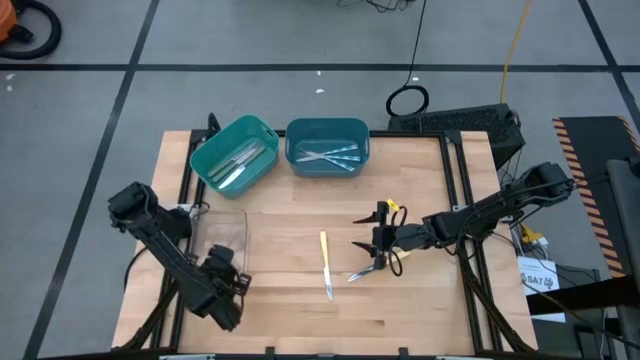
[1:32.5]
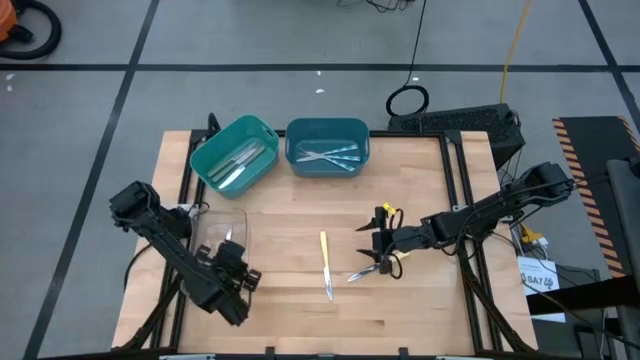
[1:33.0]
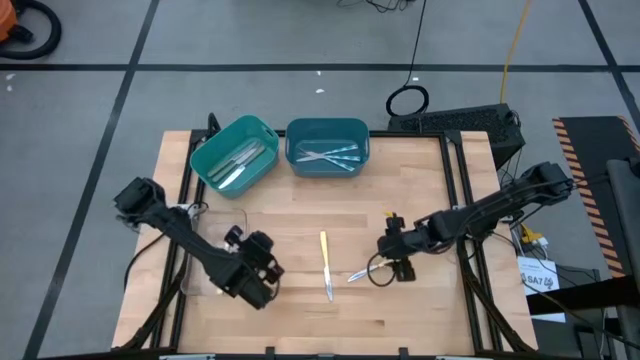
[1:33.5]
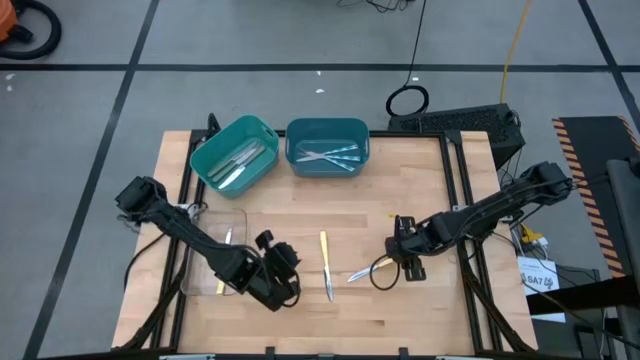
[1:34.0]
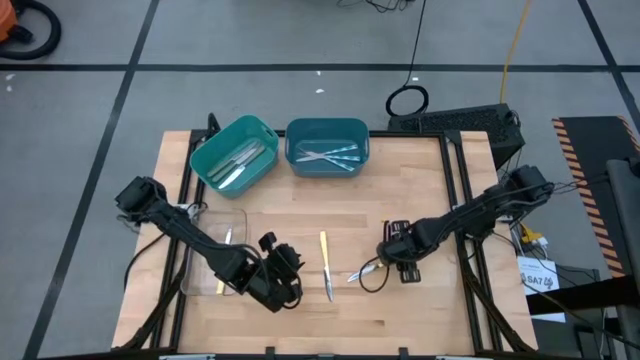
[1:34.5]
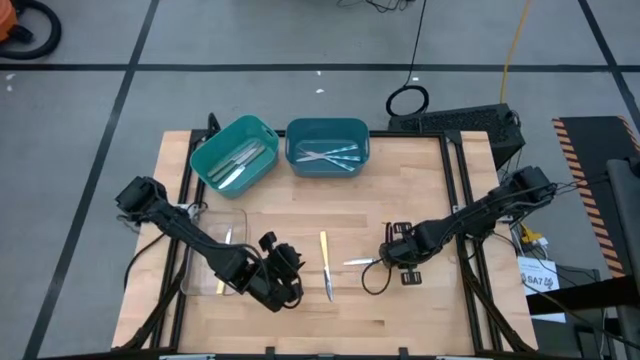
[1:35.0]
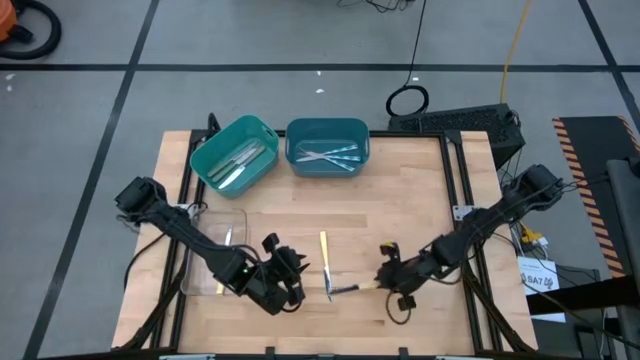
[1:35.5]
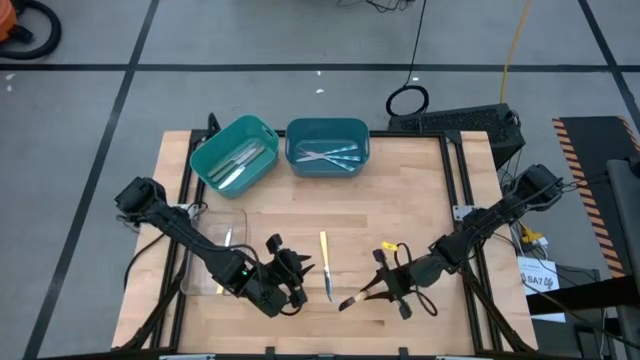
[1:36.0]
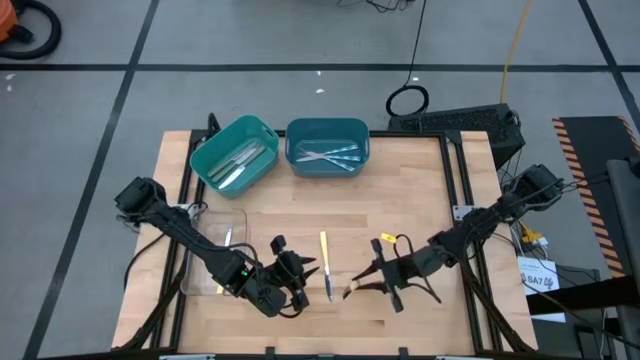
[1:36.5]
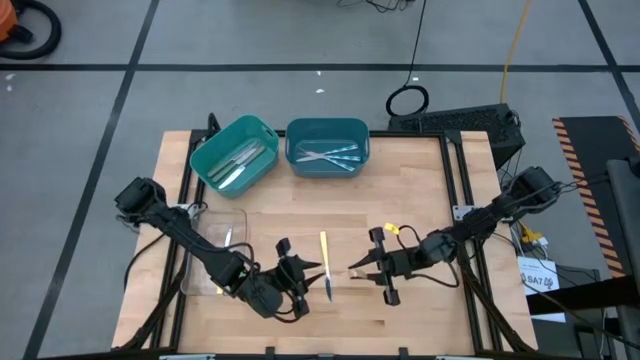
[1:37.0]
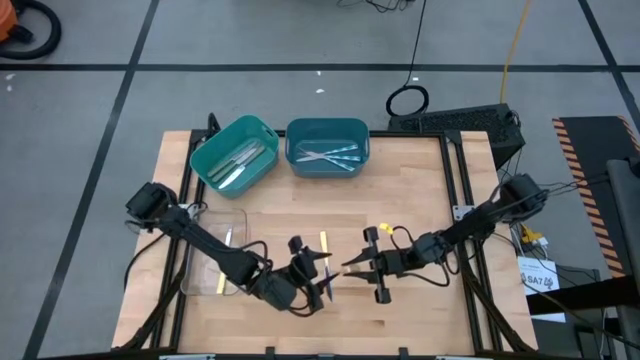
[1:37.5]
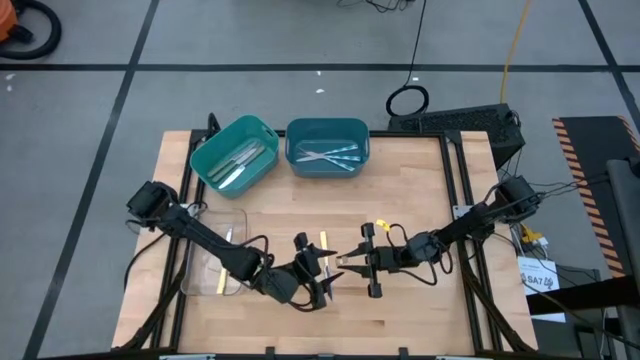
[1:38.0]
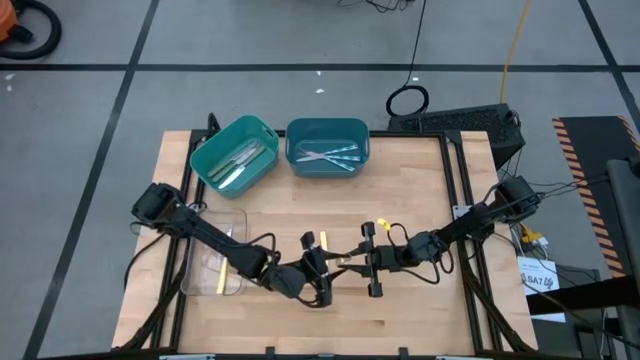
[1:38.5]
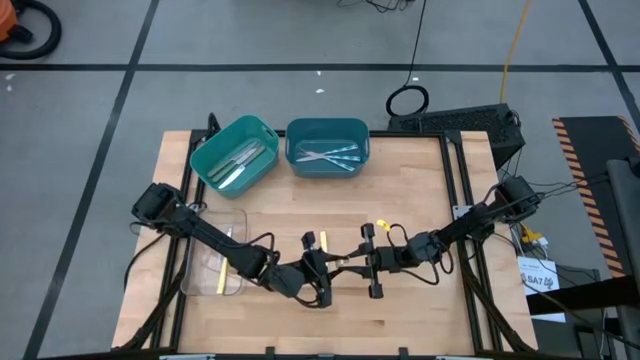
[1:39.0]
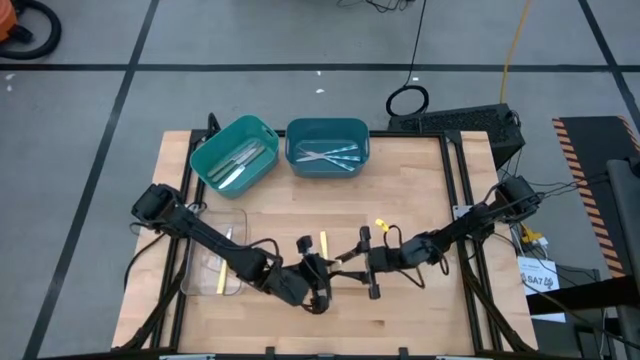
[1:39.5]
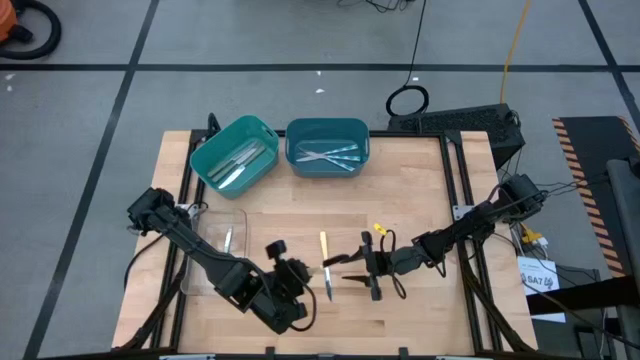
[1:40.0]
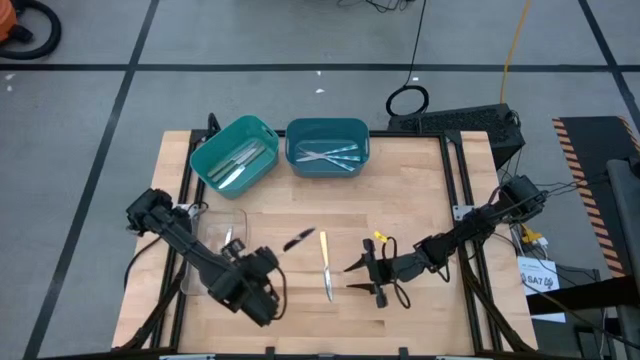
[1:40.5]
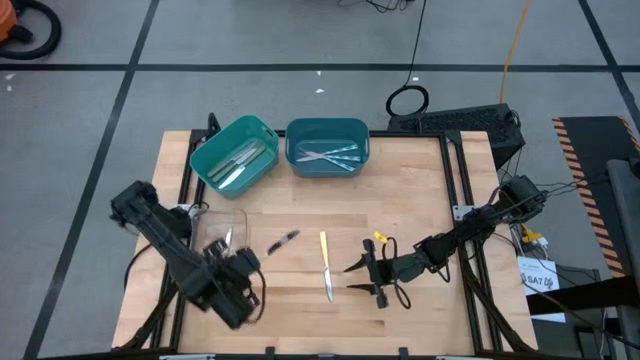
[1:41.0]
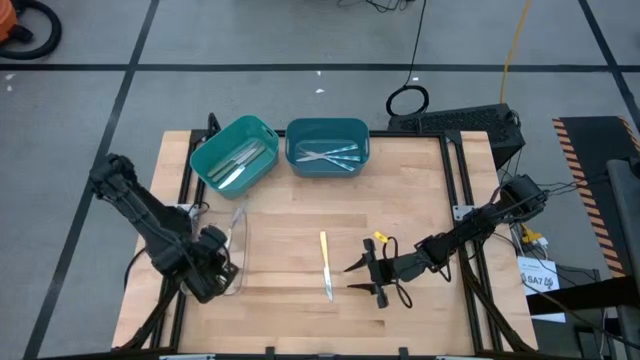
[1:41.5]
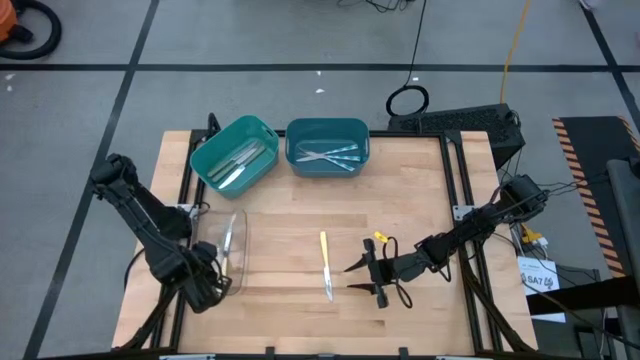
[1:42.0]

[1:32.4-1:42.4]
Task: Sort silverware by color (type)
Put the right yellow table knife into the transparent bin

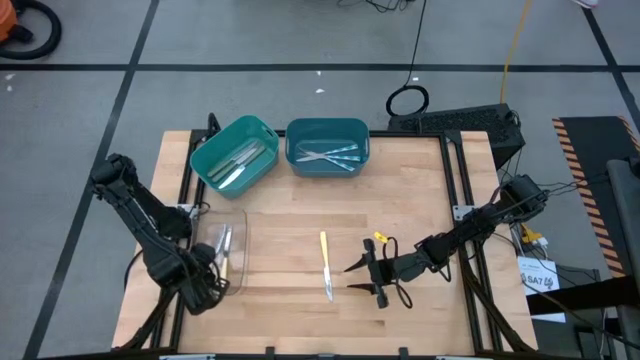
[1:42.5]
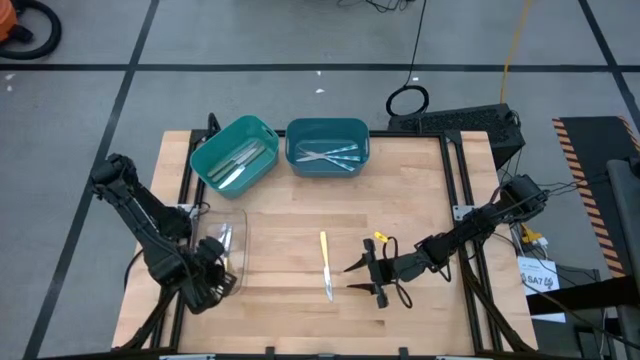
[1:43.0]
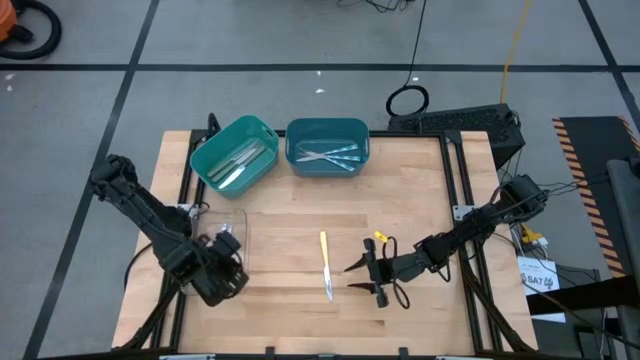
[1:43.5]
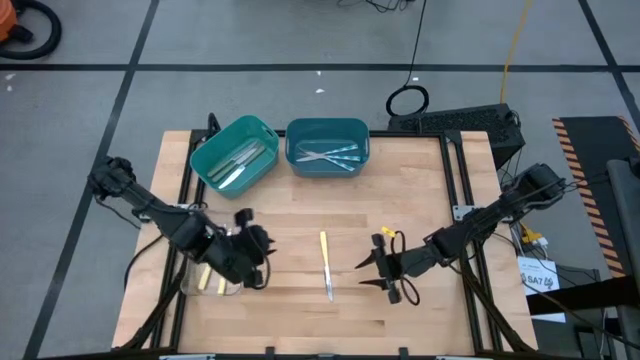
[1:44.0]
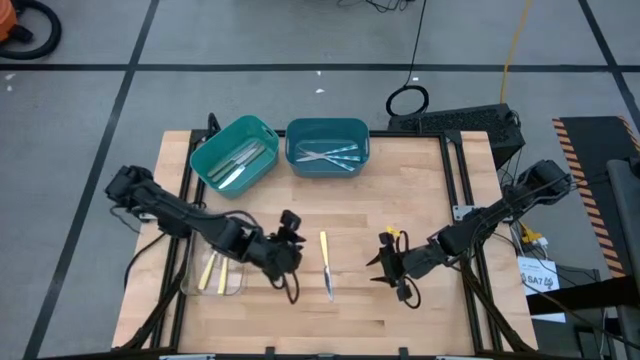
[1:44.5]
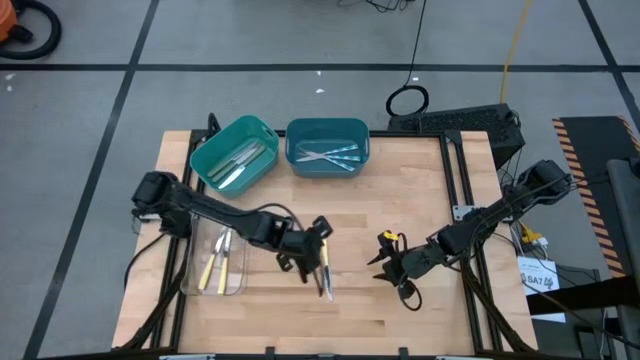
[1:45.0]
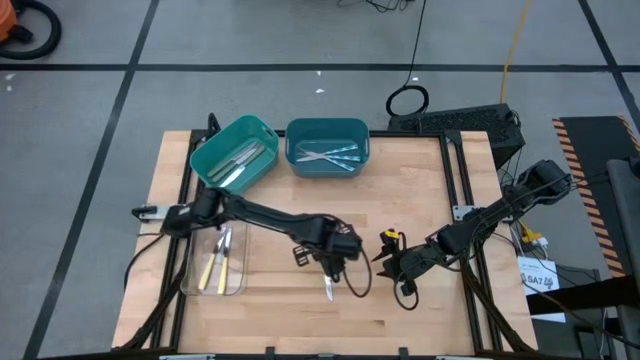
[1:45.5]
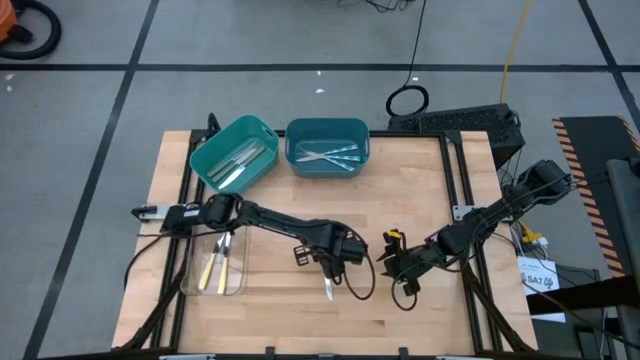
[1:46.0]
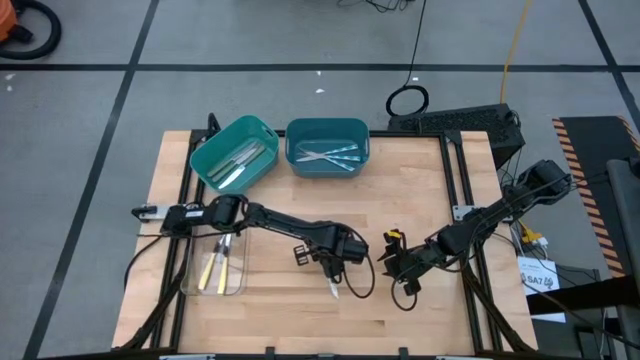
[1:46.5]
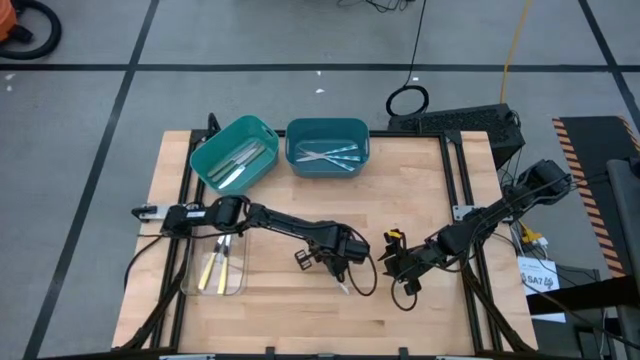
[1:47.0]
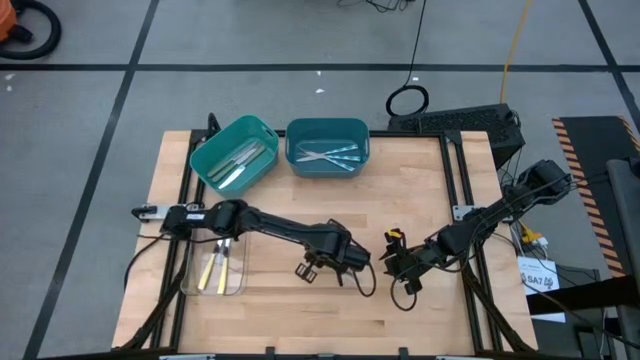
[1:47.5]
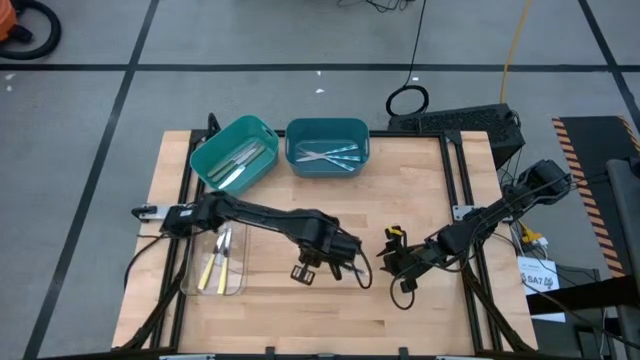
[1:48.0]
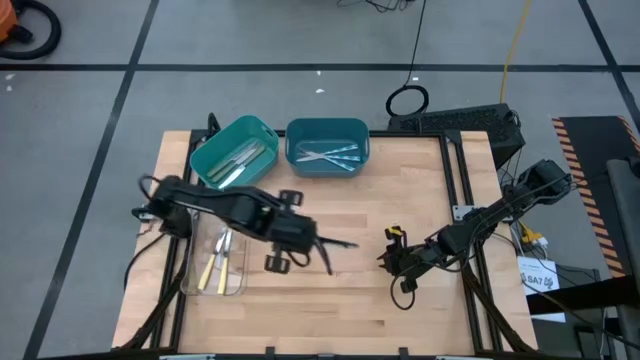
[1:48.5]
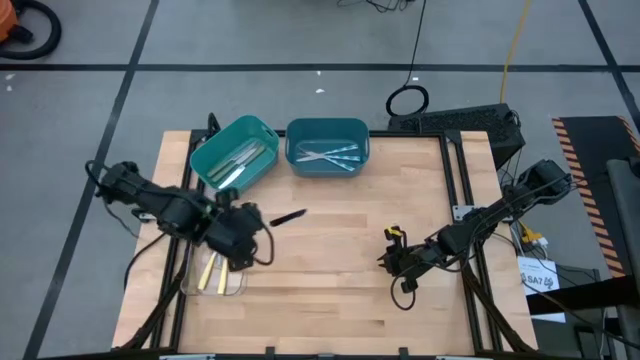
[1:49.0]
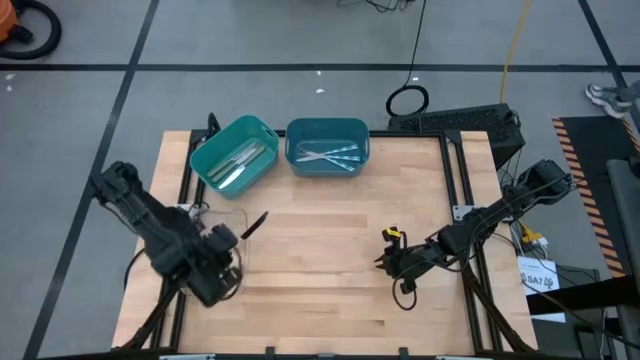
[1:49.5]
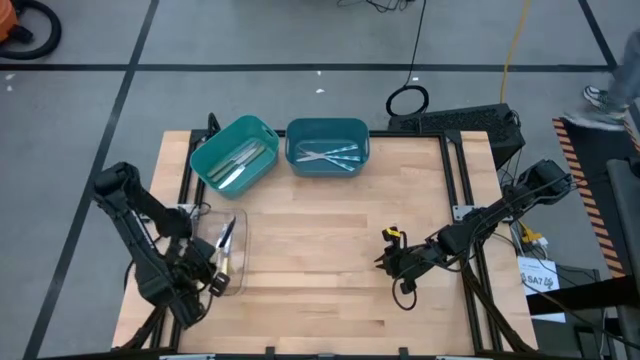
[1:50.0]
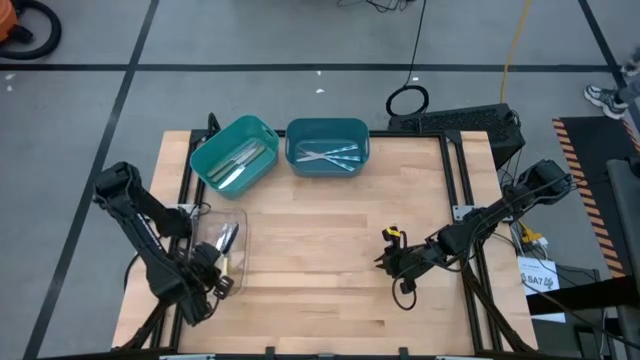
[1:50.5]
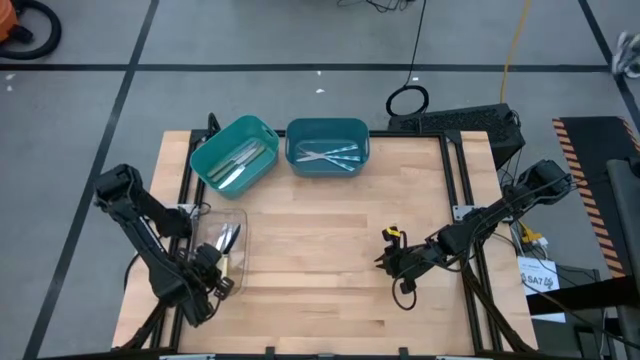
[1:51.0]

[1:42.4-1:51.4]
Put the yellow table knife into the transparent bin

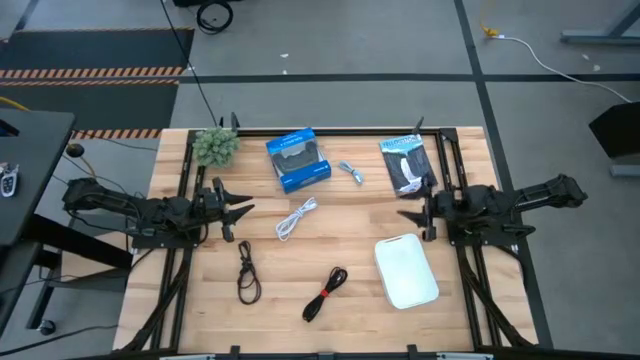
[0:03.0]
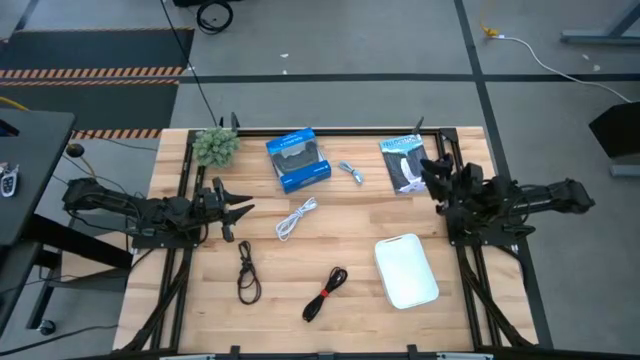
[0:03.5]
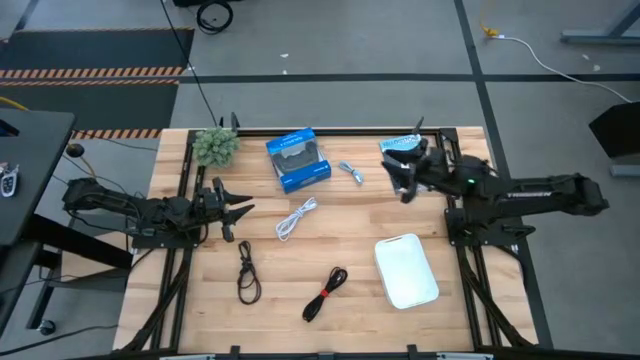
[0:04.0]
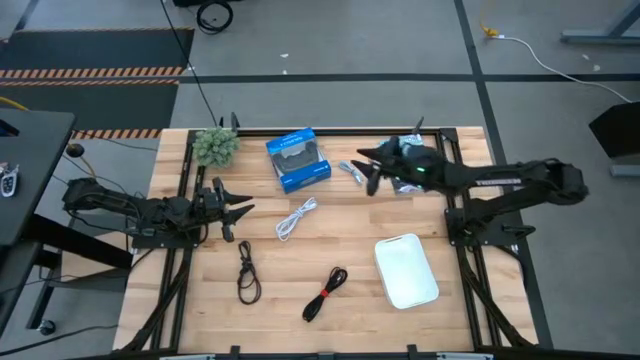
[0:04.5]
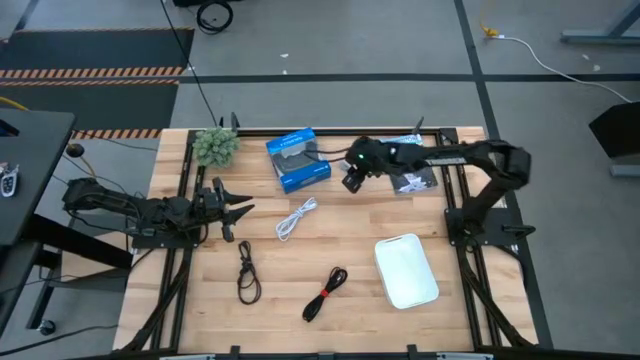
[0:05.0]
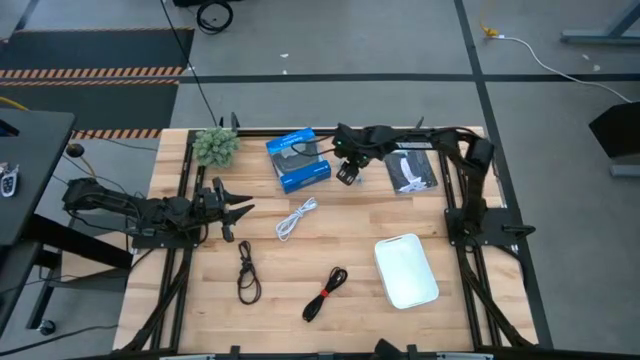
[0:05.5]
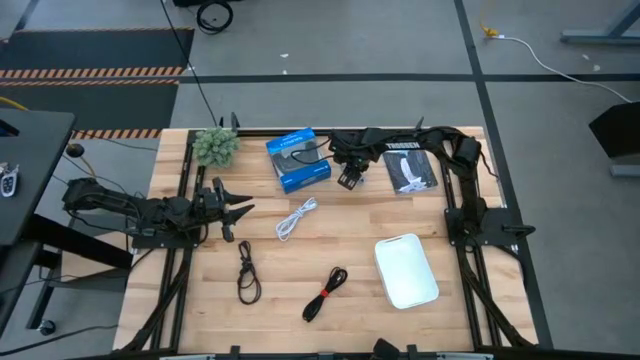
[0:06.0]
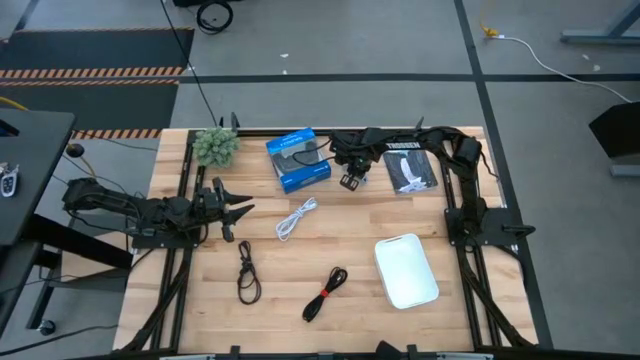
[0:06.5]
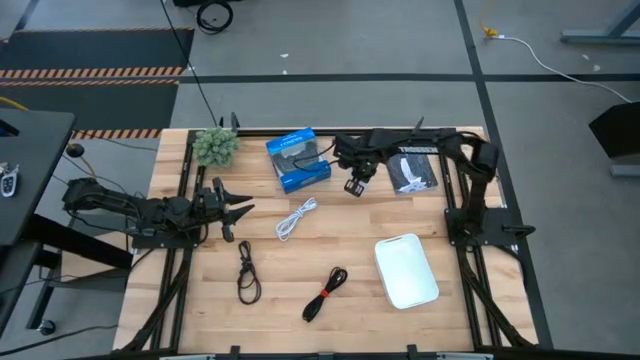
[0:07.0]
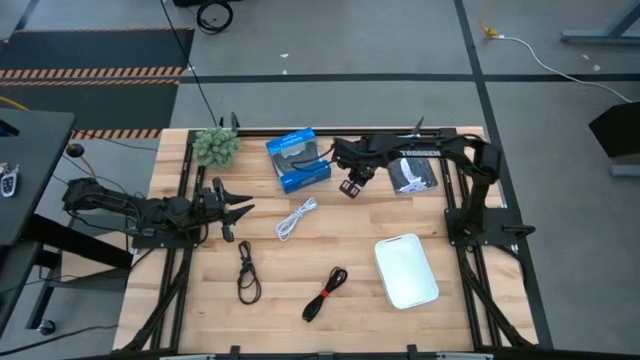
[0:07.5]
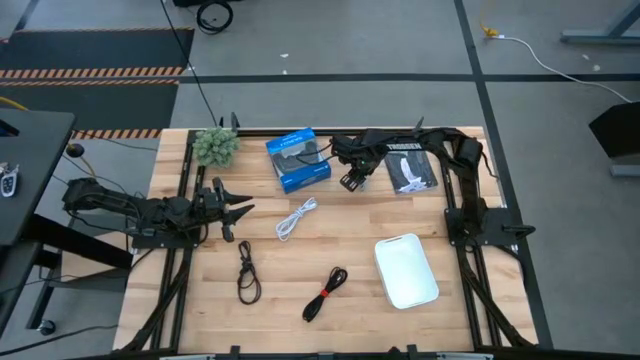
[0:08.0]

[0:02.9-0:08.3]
Task: Pick and place USB-C Cables
Put the top light blue charger cable into the white bin
